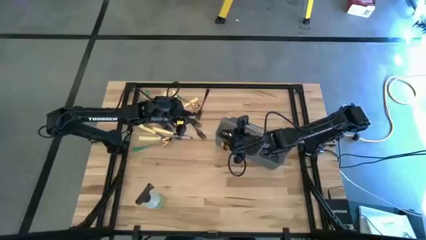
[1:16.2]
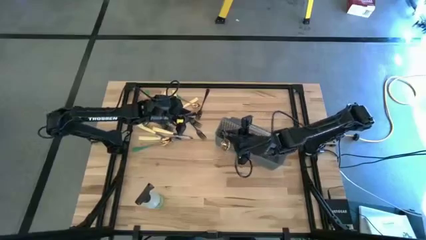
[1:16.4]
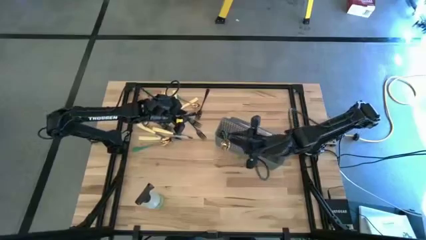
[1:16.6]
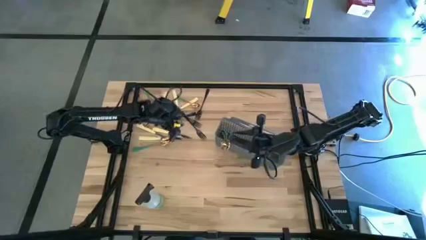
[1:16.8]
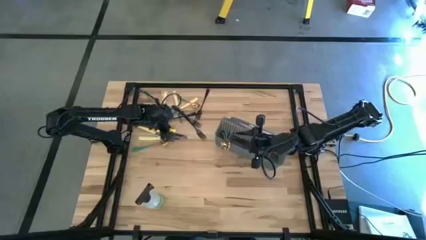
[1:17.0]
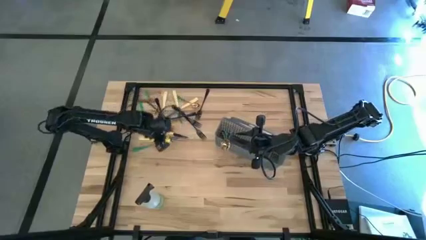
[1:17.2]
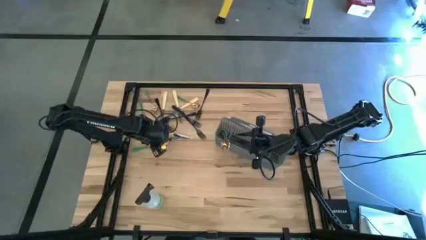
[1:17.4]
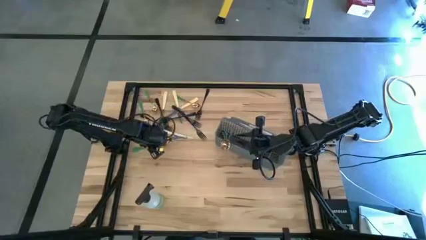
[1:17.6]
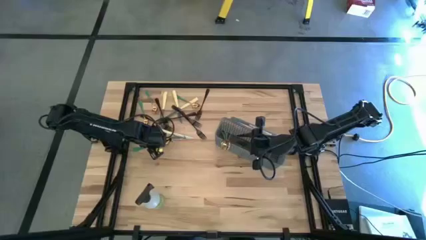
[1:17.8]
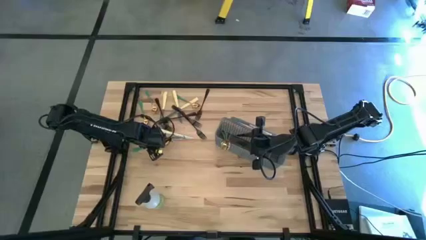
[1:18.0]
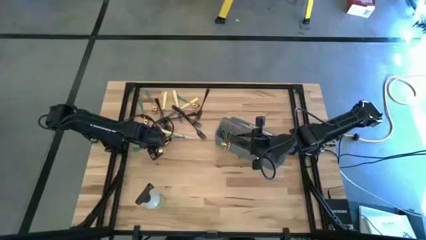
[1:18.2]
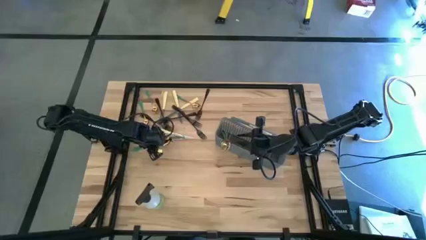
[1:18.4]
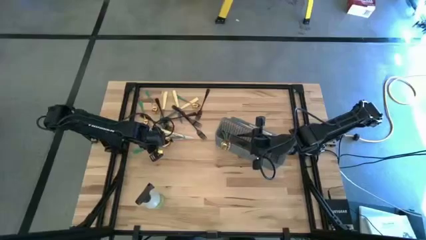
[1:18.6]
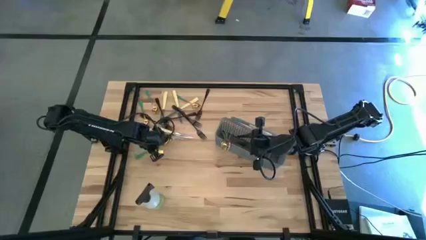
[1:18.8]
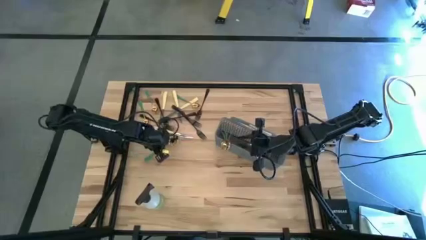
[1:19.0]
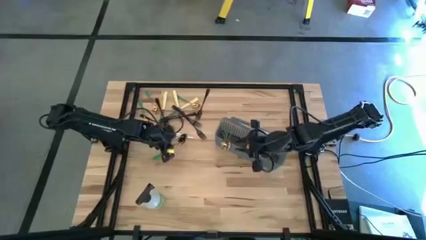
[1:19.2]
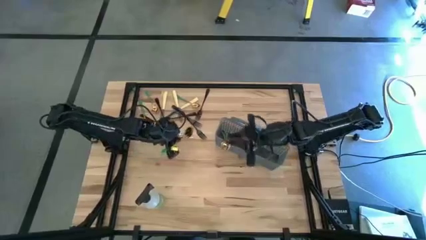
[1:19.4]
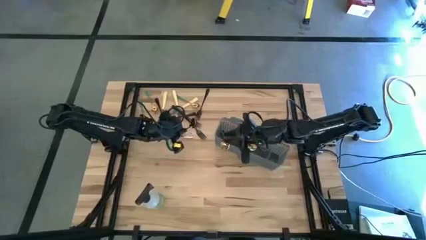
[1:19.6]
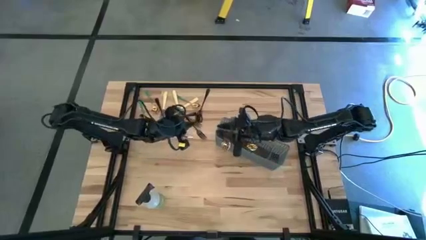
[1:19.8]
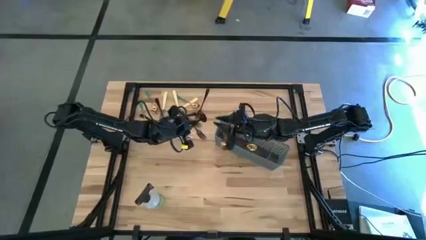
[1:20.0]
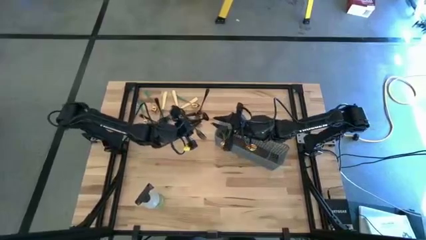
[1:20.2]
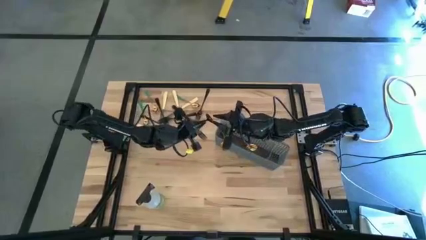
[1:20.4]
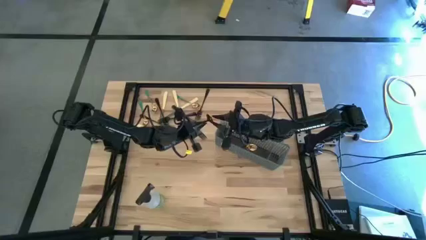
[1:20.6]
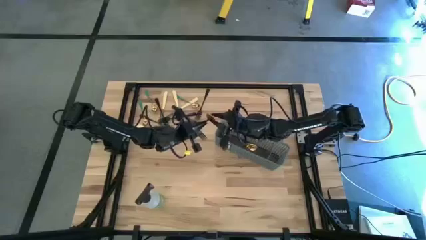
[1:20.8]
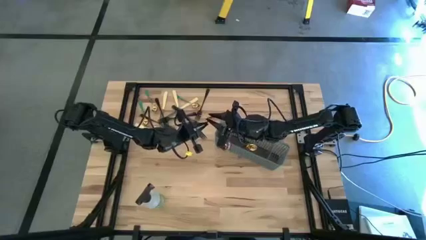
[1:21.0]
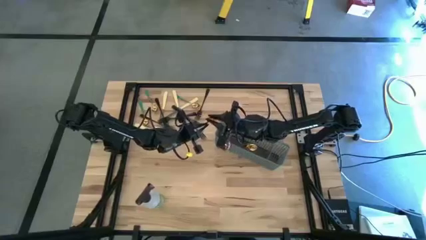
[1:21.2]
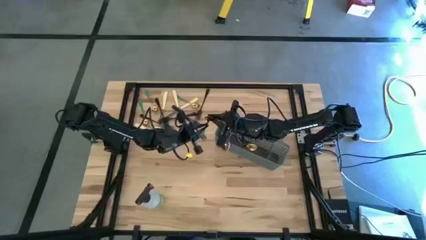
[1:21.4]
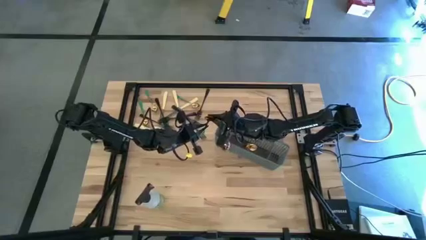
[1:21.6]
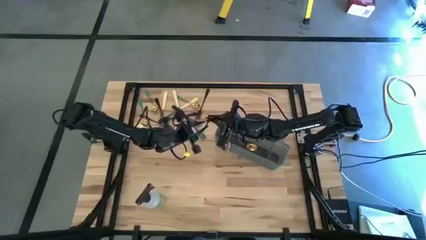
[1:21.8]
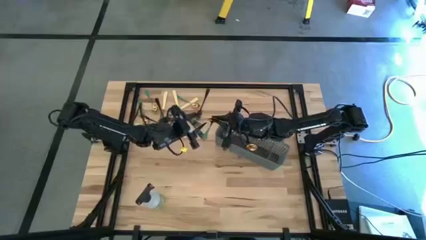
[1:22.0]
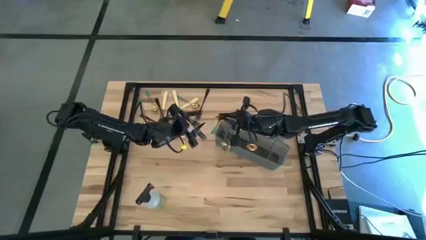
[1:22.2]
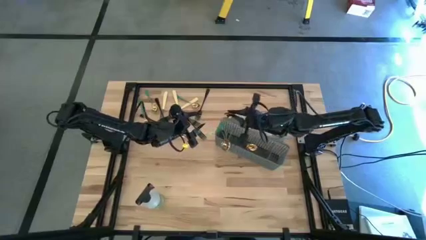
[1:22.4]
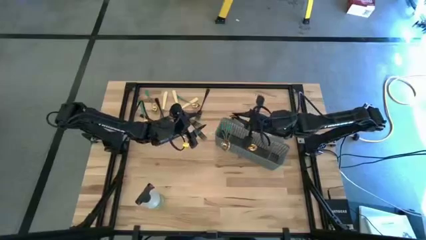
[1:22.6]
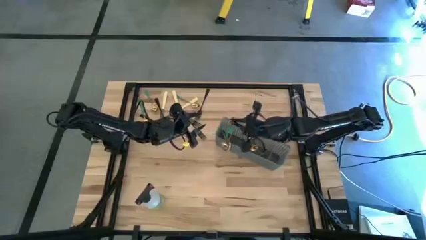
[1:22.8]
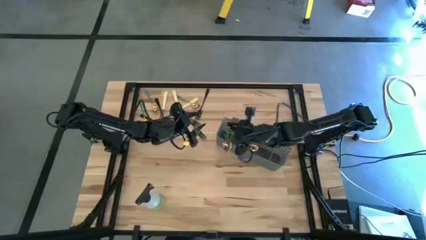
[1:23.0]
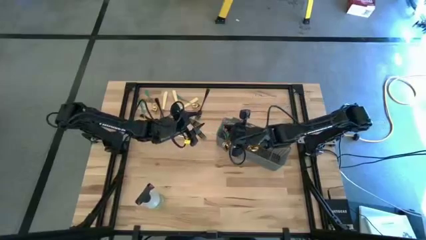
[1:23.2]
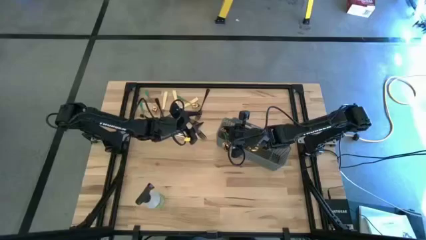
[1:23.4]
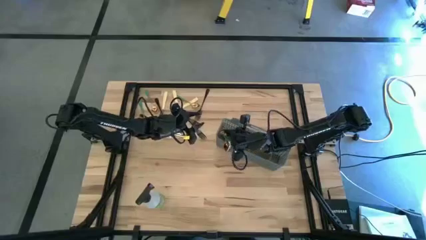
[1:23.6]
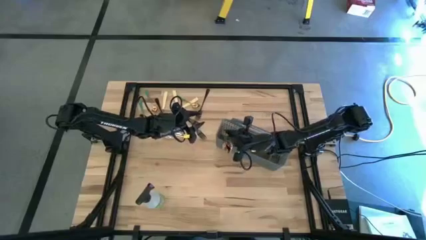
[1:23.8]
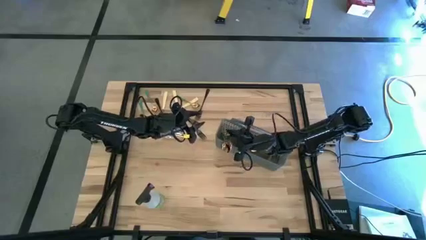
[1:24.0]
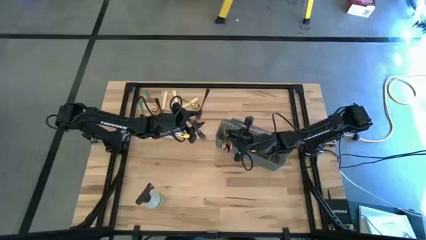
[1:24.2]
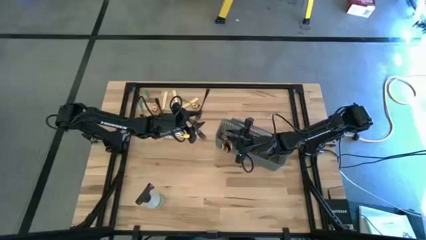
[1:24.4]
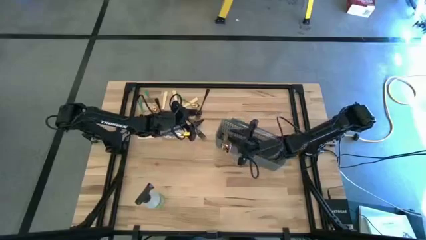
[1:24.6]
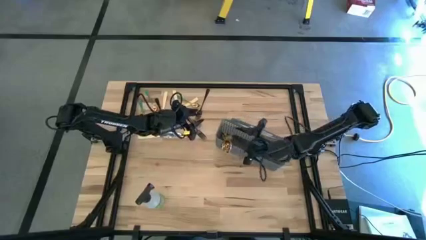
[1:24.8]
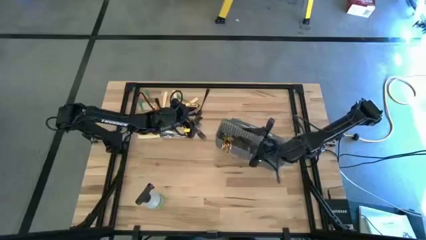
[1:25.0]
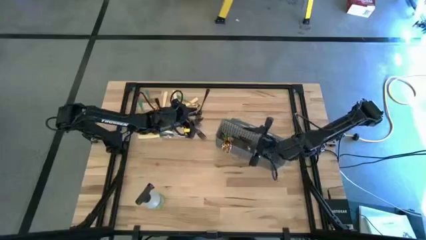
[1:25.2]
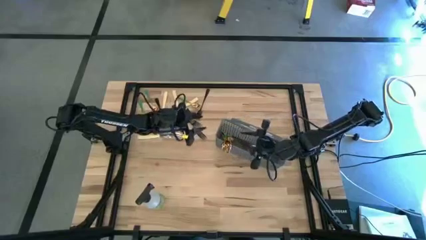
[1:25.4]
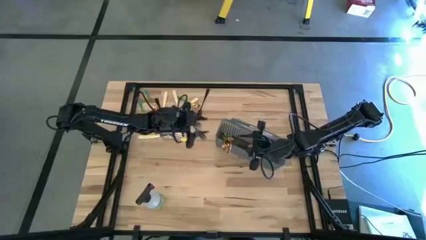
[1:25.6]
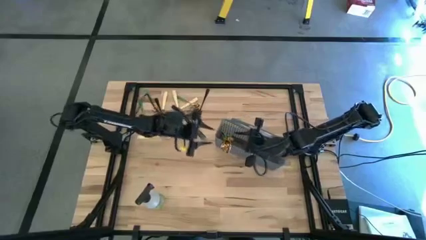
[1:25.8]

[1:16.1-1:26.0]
Task: Sort silverware
Put the gold spoon into the cutlery rack

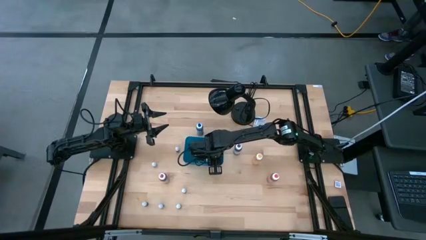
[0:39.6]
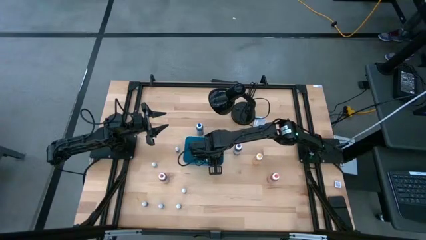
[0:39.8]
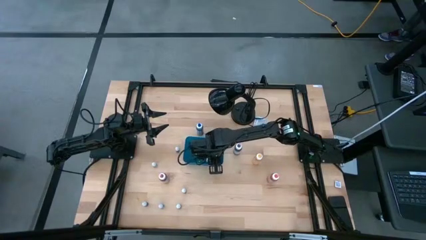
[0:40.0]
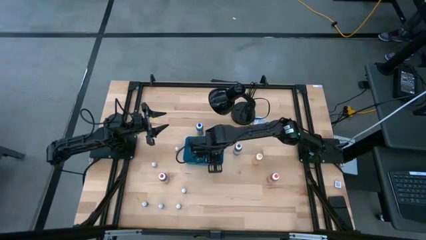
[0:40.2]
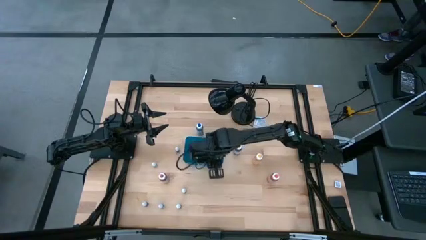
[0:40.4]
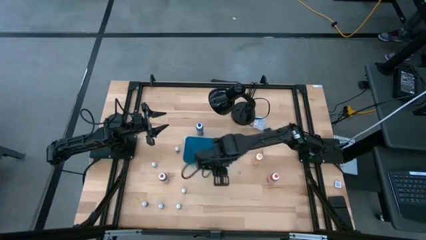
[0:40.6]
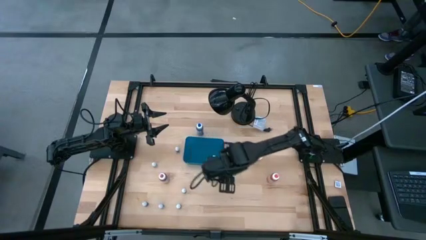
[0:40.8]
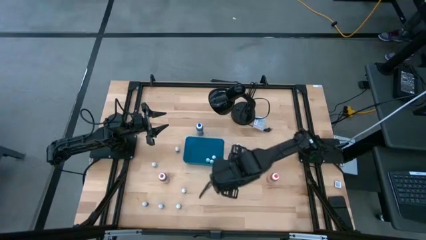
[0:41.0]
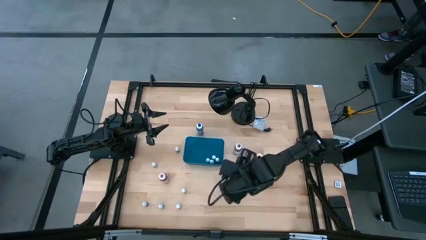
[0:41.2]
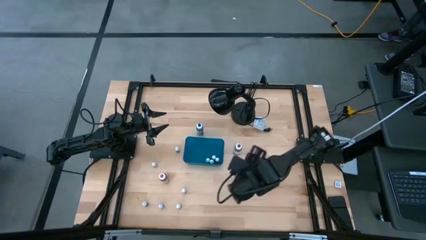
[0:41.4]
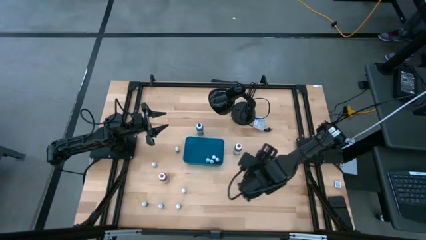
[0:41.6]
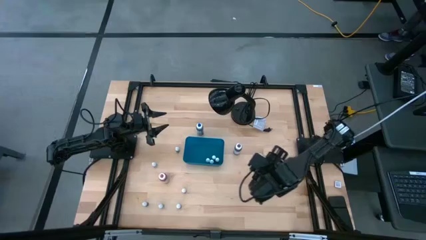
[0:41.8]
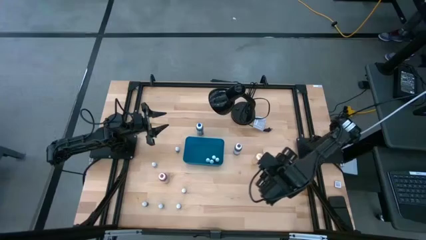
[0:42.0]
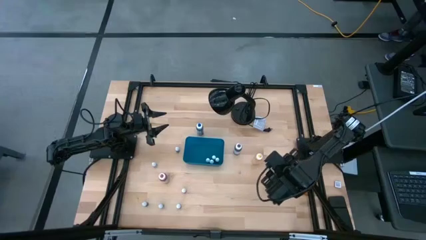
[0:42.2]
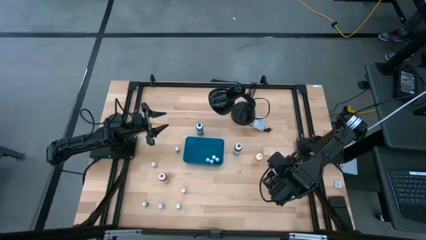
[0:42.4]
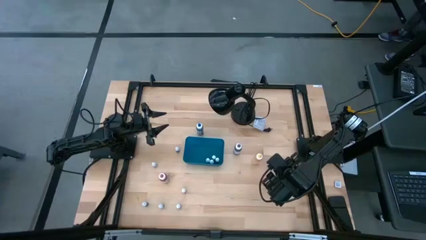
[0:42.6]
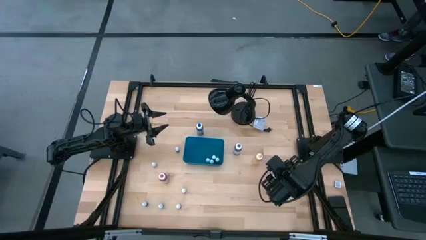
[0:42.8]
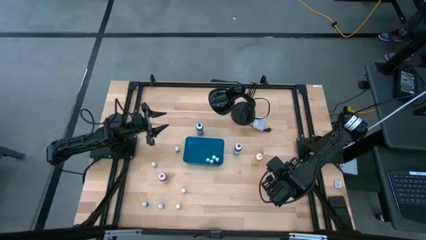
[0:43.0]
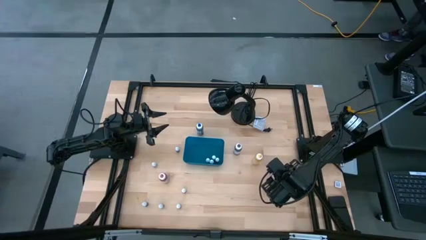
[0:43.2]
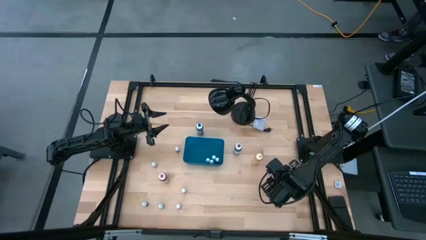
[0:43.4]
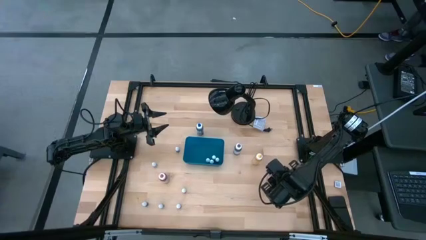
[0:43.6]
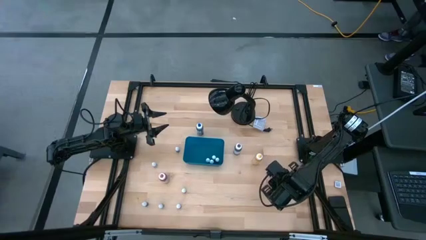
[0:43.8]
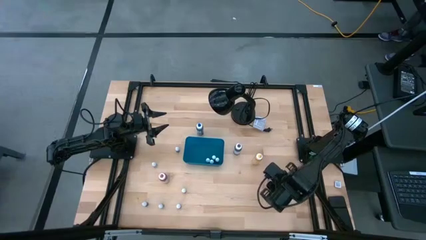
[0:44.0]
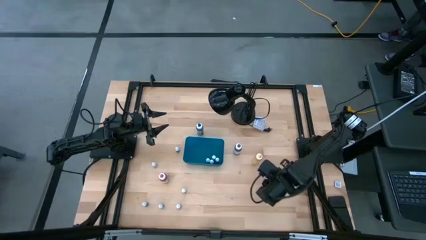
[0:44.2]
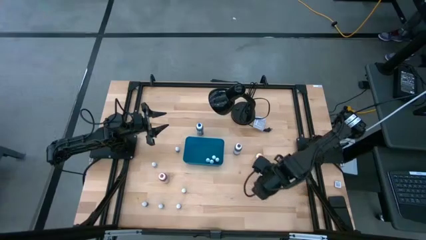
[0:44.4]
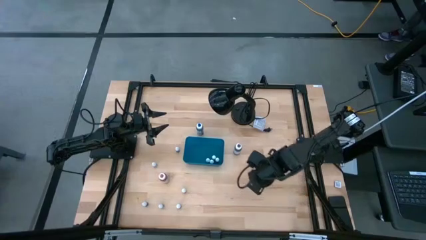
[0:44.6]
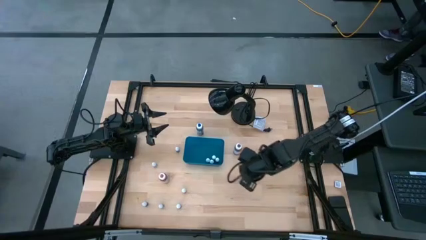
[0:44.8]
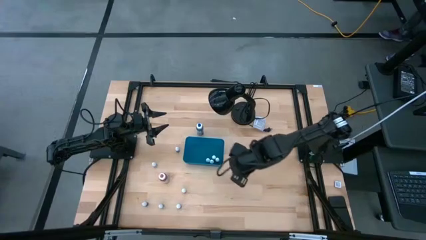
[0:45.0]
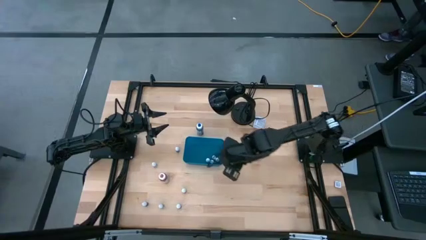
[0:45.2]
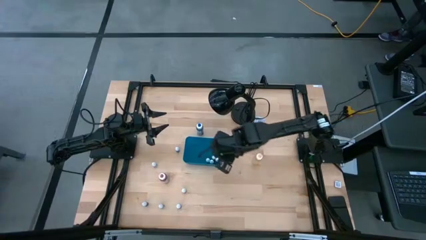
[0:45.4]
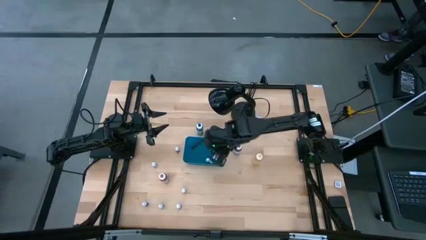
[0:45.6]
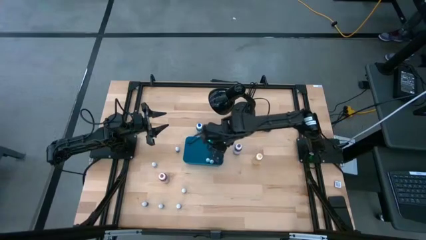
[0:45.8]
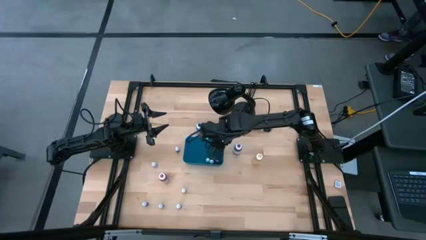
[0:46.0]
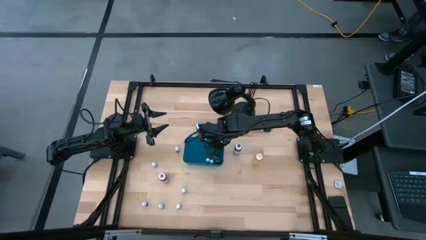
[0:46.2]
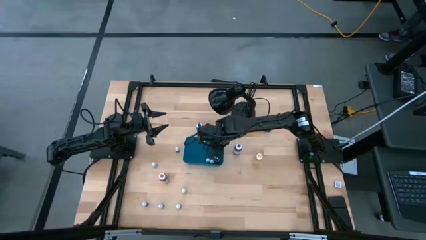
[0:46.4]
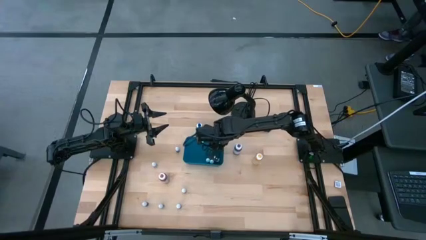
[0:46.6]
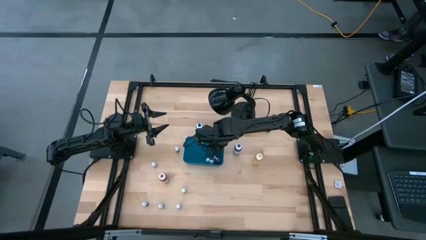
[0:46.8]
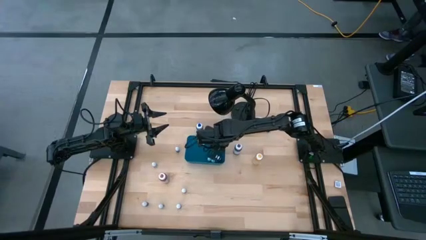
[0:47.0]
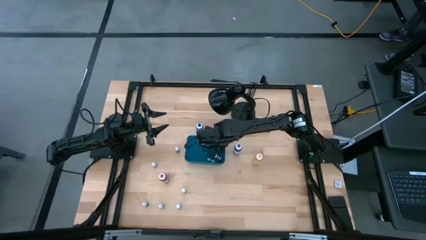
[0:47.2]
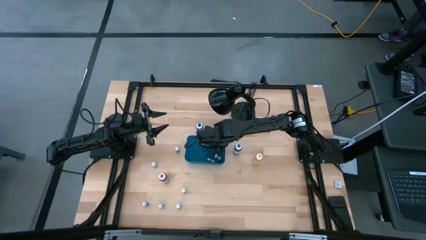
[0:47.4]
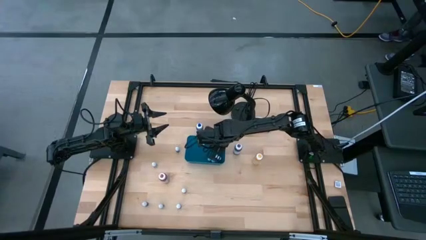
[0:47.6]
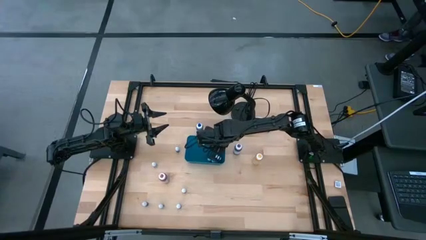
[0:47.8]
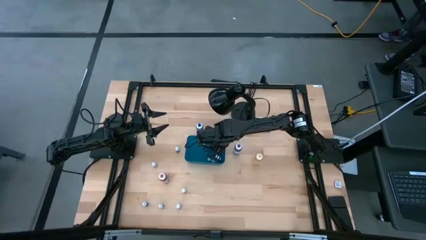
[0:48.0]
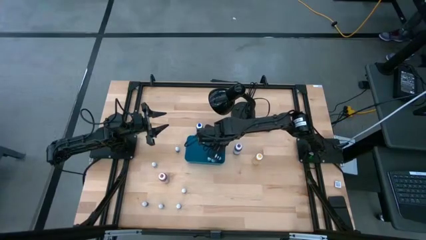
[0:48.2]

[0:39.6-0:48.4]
Task: Pick & Place food coloring
Put the large orange food coloring bottle into the blue bin
